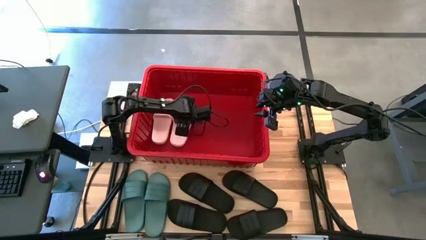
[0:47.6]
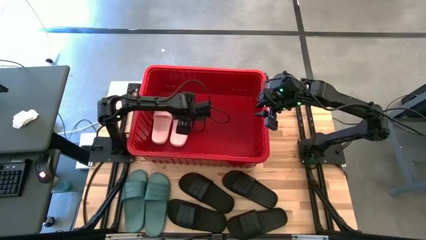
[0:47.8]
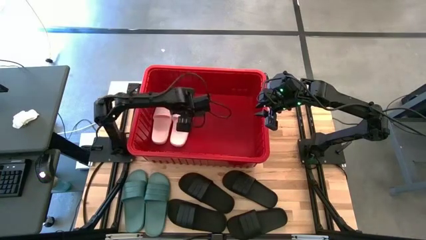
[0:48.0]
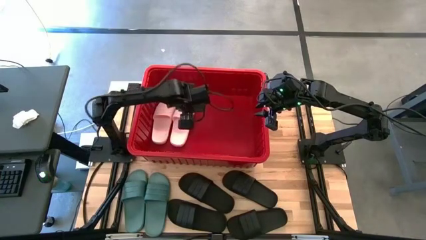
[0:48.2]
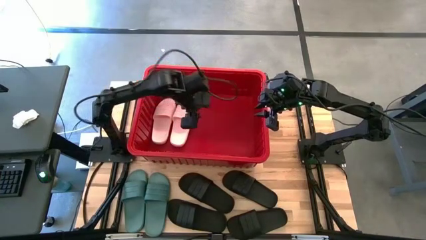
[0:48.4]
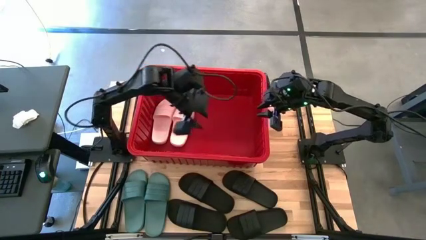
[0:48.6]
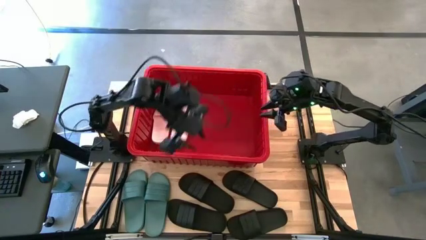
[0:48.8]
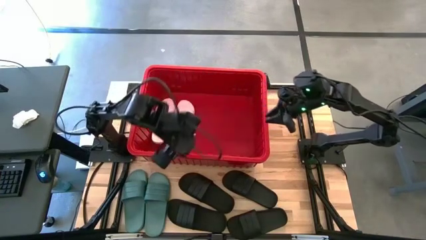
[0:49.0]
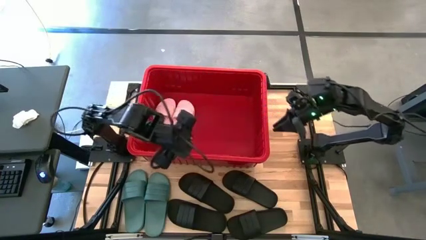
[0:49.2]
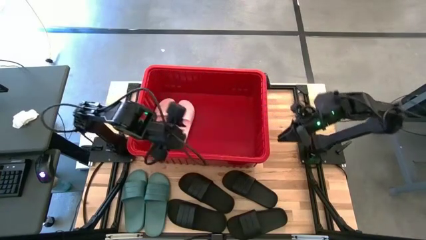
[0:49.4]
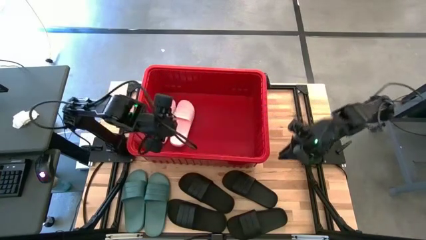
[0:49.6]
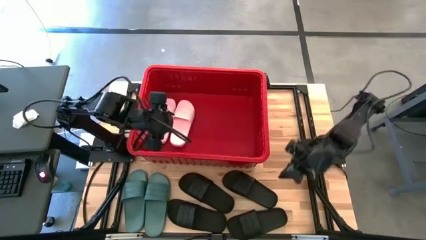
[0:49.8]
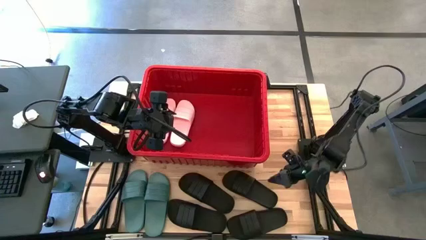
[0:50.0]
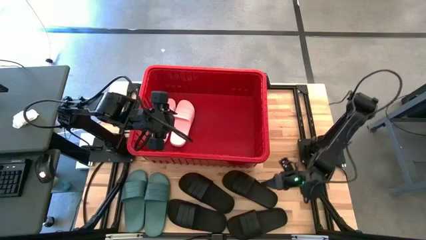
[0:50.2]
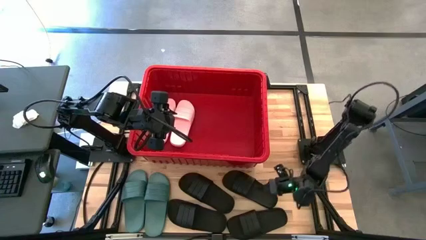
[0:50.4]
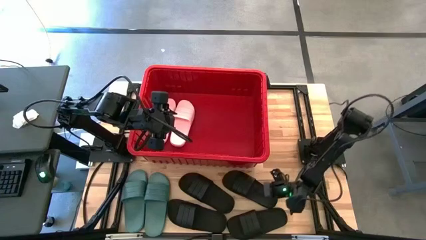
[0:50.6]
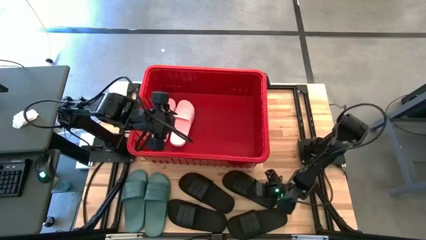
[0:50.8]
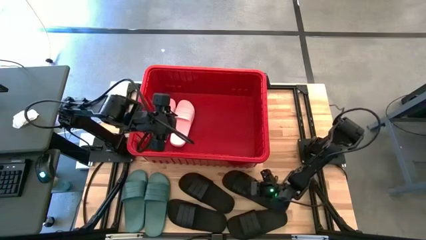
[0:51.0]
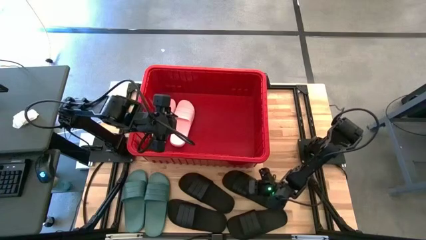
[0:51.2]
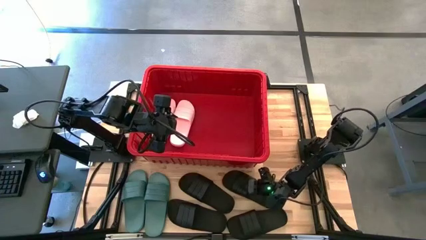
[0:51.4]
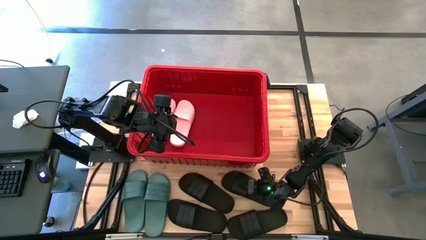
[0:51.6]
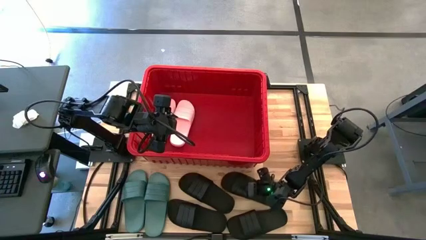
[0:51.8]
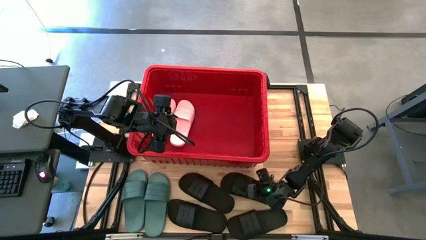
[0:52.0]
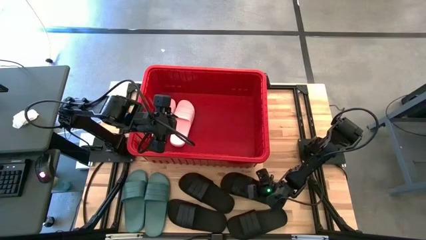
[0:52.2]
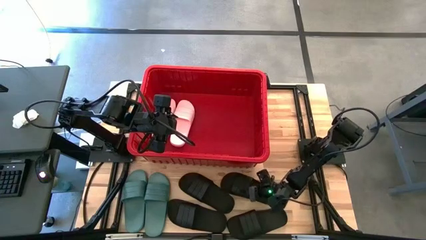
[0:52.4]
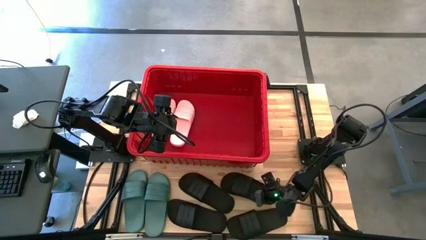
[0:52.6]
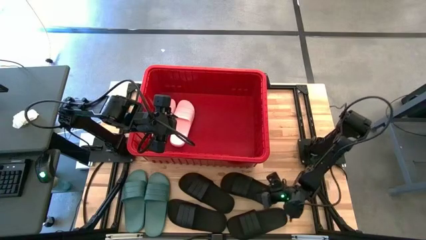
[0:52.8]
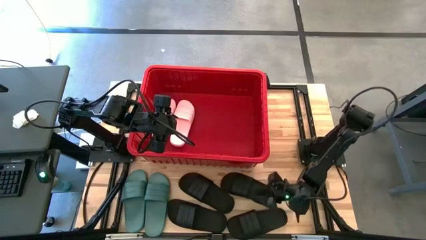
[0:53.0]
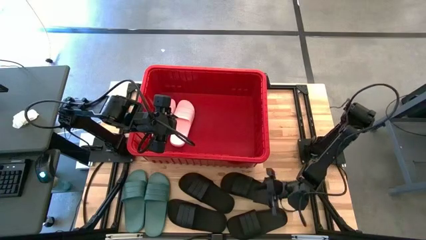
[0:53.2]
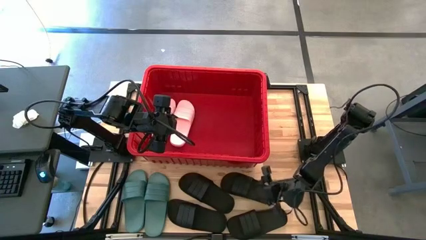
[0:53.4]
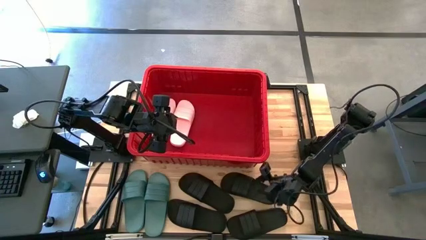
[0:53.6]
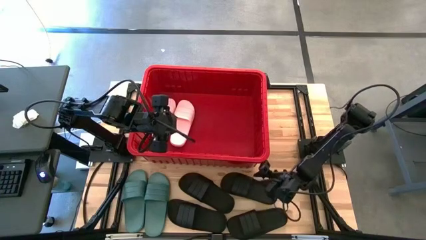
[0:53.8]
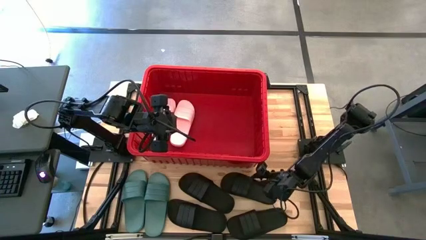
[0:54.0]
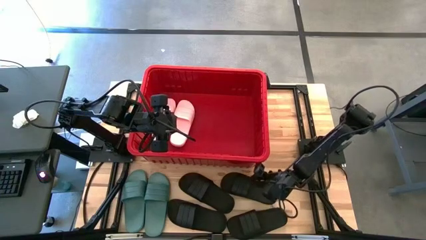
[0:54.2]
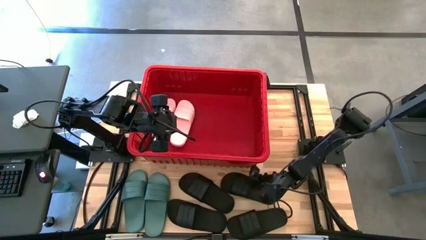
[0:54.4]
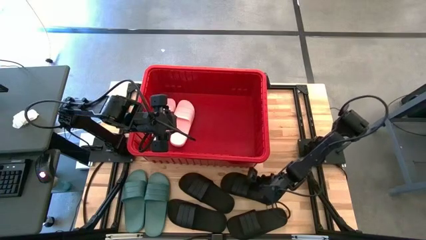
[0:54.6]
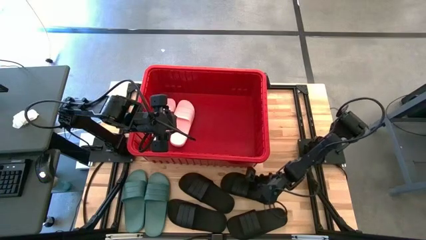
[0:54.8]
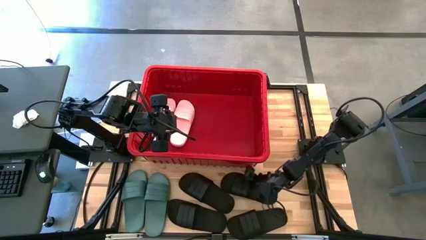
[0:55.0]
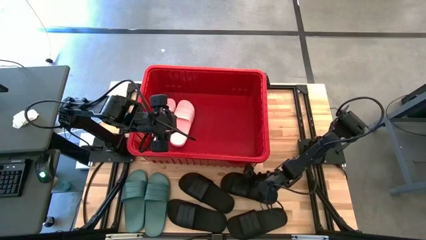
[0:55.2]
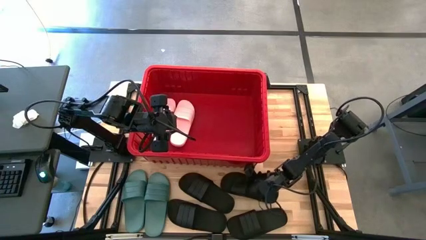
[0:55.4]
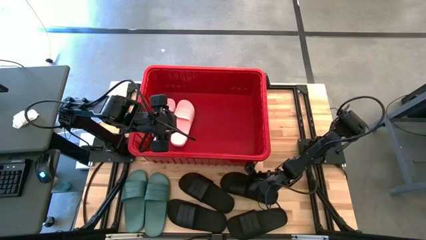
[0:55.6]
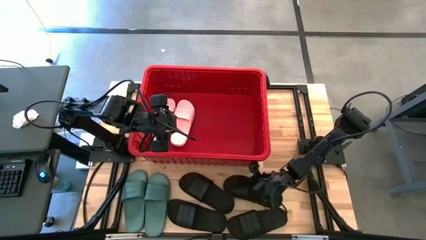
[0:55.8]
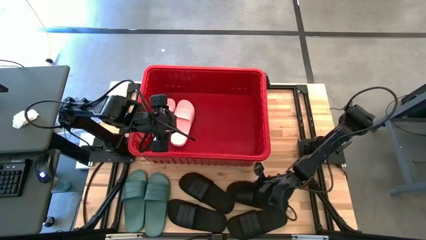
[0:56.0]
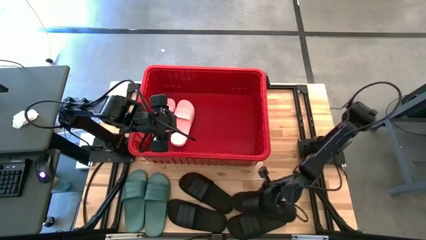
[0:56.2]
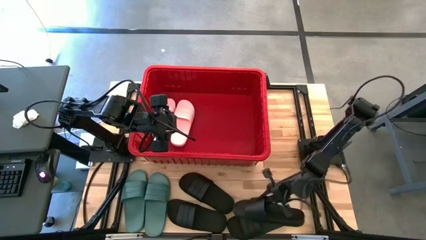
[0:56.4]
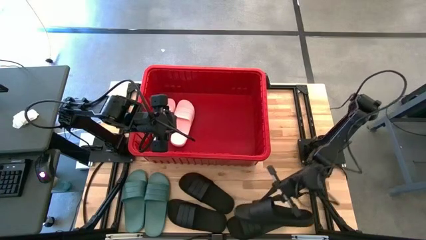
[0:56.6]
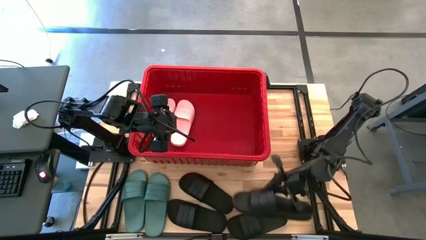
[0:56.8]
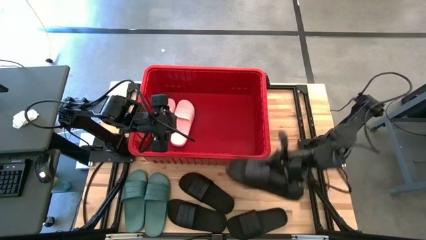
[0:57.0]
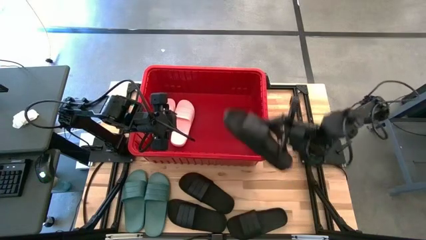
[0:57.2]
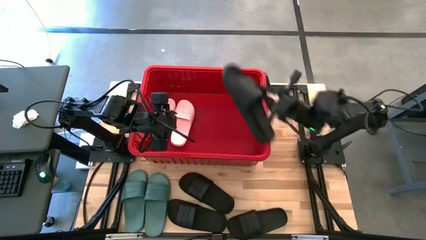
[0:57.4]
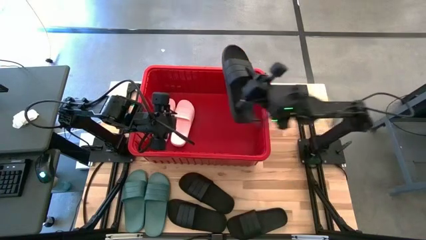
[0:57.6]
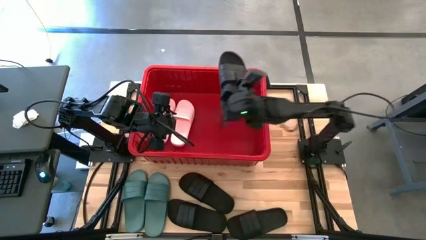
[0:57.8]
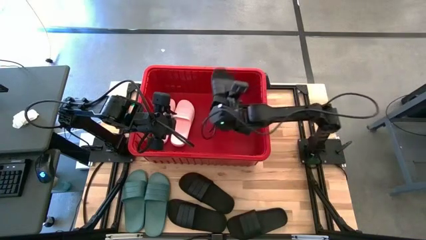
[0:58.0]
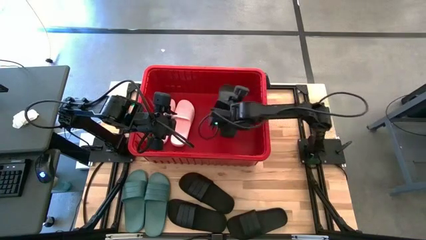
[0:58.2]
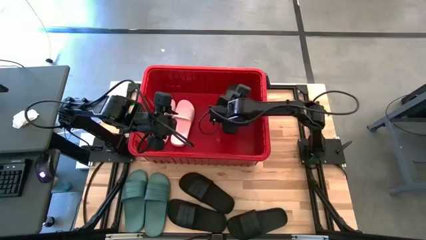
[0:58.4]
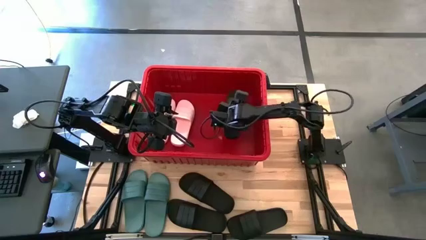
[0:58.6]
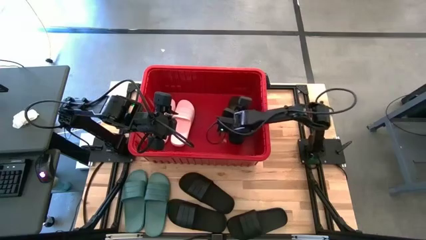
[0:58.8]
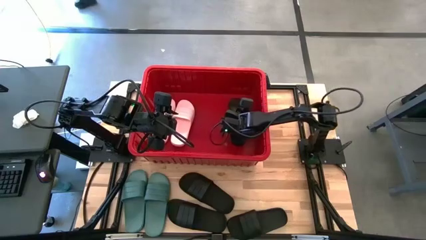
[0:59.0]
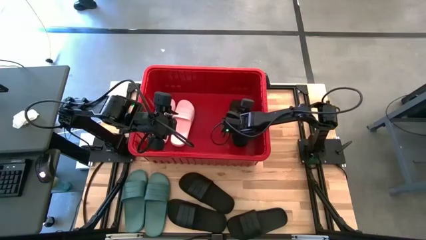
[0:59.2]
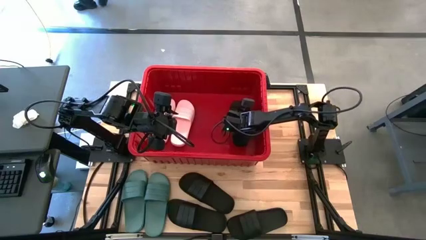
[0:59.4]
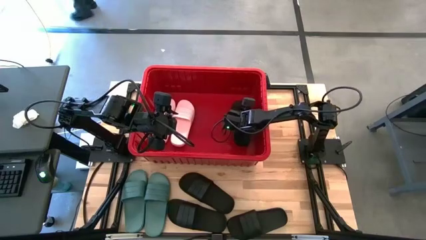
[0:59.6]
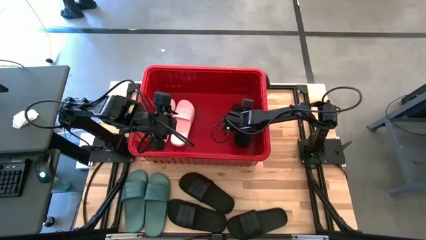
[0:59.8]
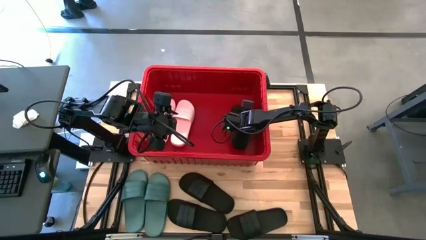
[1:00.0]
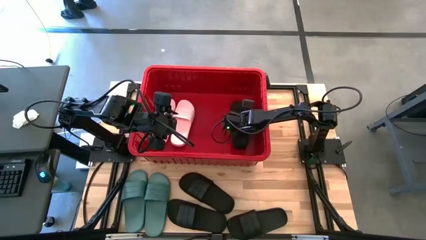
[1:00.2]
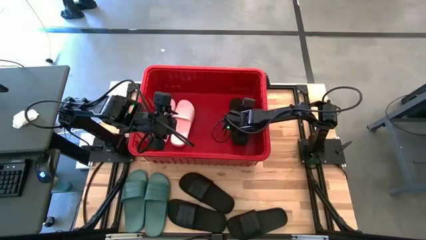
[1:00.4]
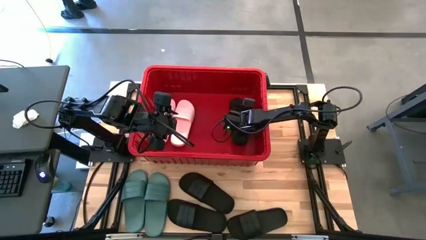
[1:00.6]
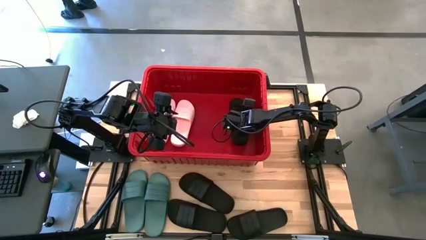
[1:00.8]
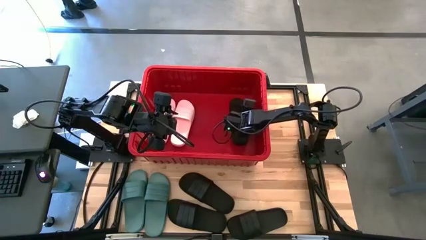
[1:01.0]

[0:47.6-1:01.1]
Task: Pick and place slides into bin
Put the black slide into the red bin

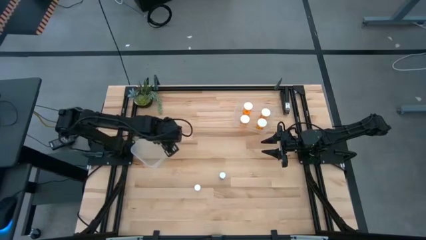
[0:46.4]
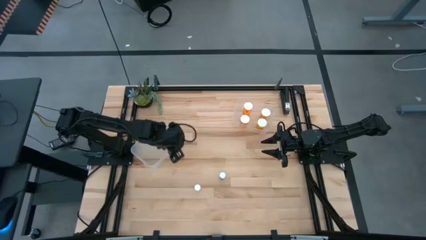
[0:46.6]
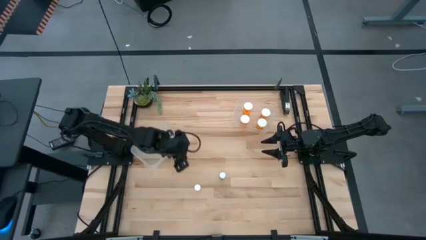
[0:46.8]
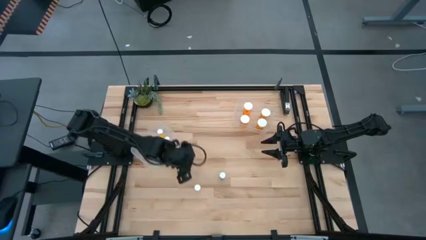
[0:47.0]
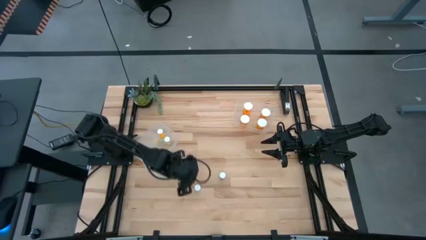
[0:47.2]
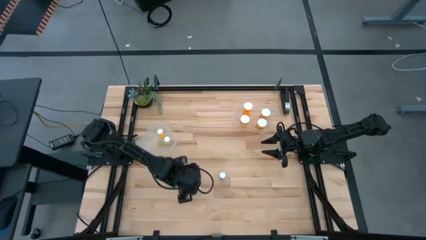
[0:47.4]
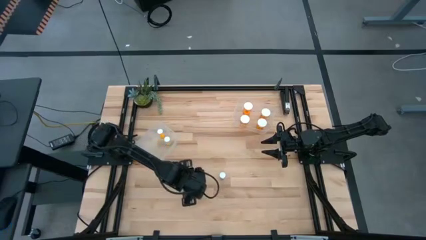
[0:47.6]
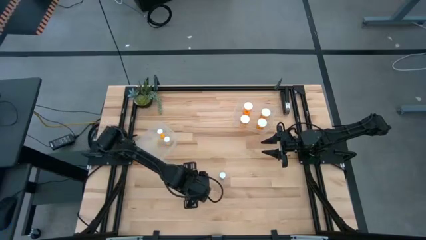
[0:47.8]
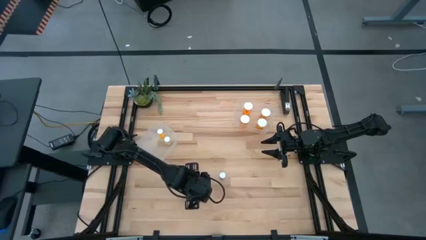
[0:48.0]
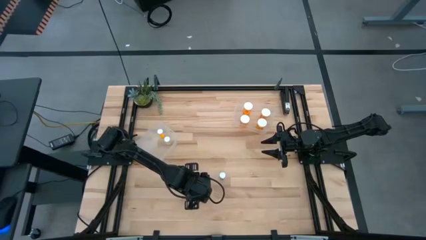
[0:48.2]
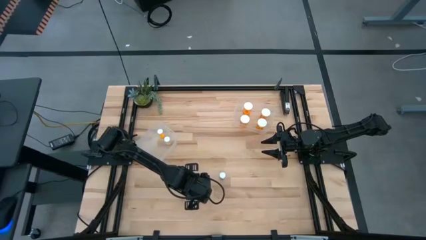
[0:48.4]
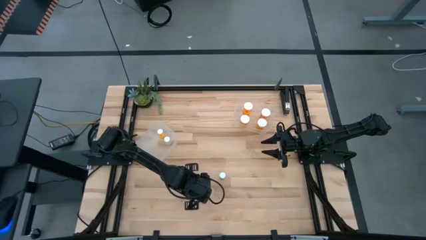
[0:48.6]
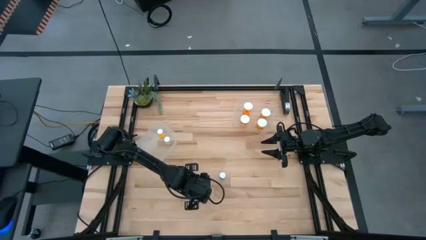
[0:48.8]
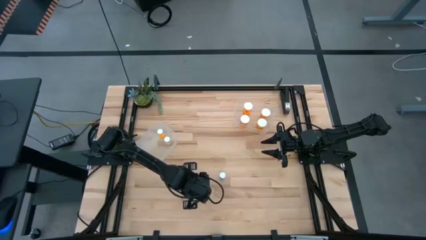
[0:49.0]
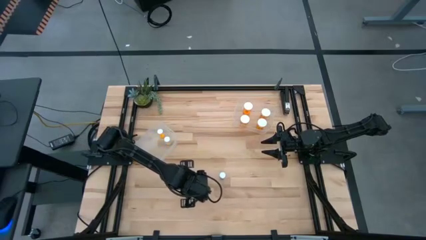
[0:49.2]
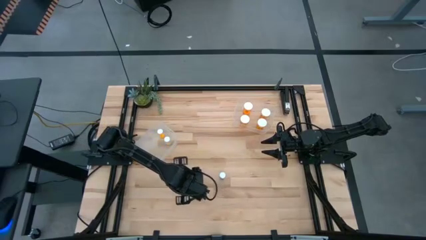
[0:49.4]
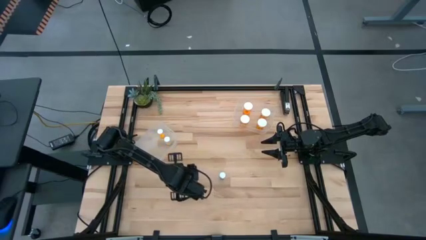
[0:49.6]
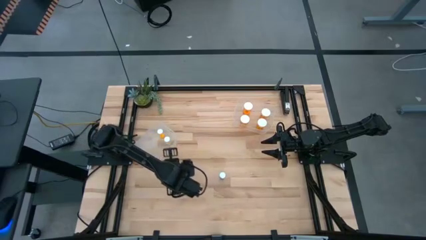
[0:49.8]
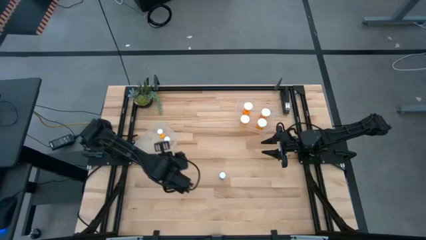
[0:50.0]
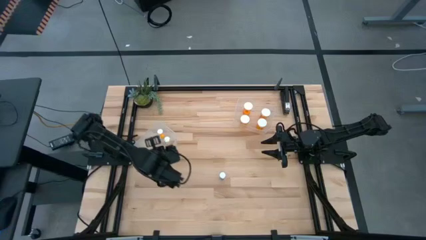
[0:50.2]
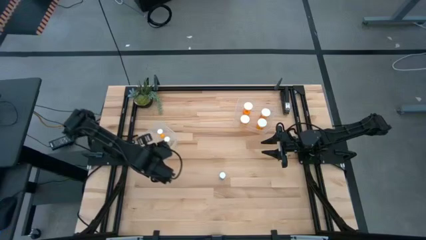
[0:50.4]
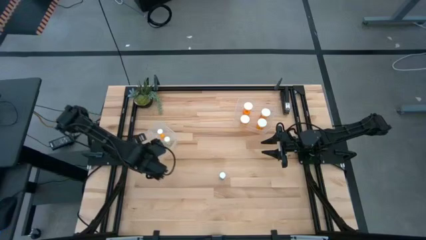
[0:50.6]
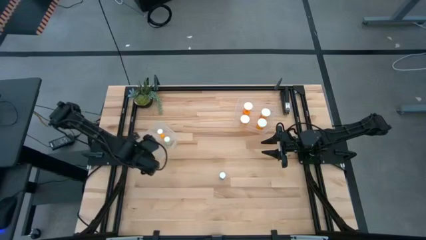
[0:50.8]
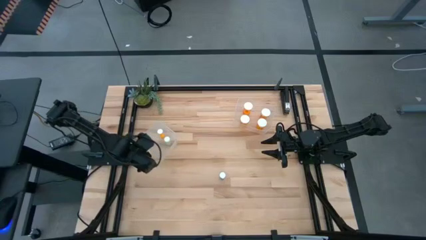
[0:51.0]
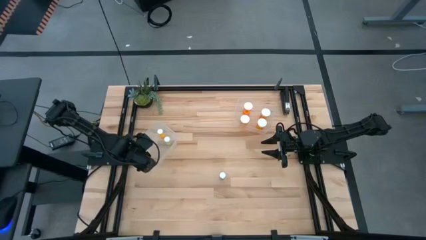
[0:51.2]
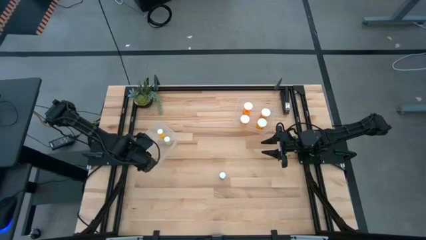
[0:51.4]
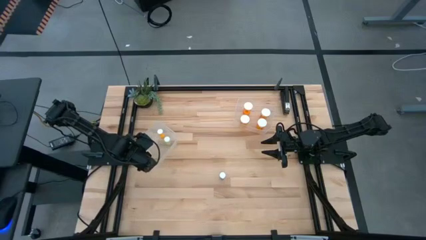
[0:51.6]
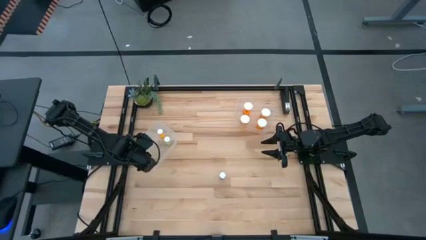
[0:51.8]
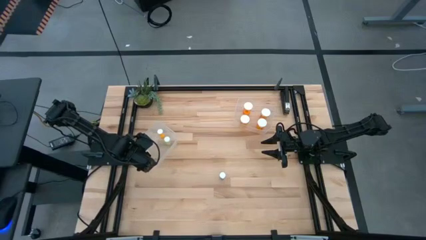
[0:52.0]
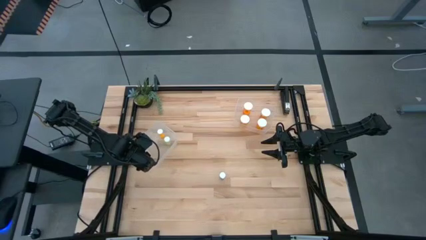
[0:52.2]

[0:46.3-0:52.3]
Task: Pick and place medicine bottles into bin by pill shape (circle, oval)
Put the small yellow pill bottle into the left transparent bin
